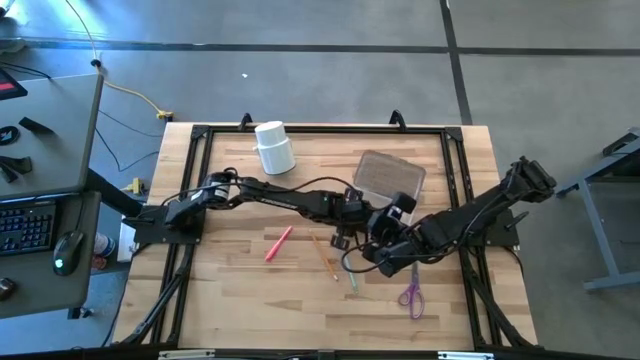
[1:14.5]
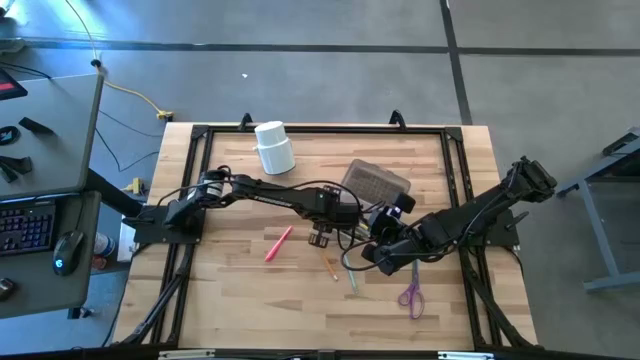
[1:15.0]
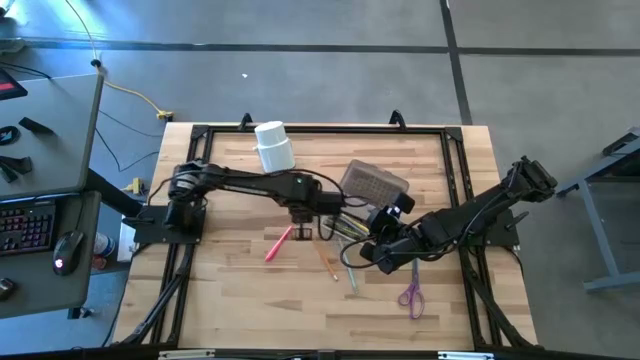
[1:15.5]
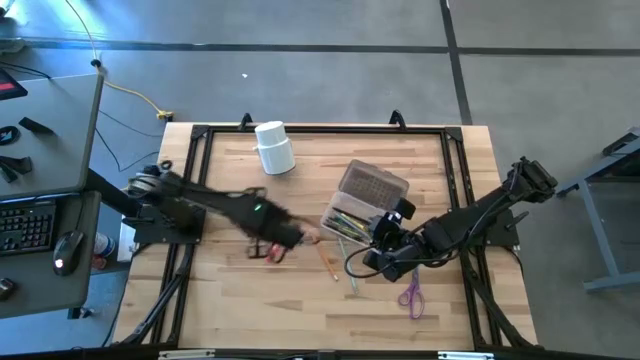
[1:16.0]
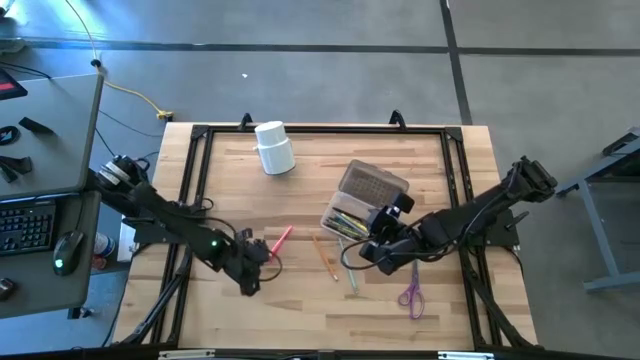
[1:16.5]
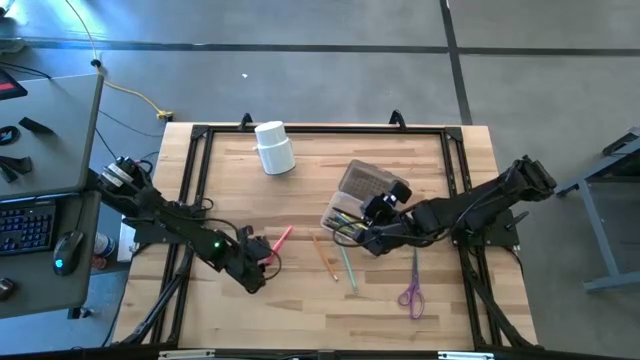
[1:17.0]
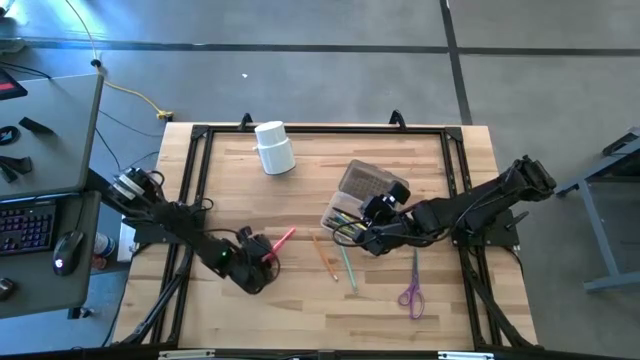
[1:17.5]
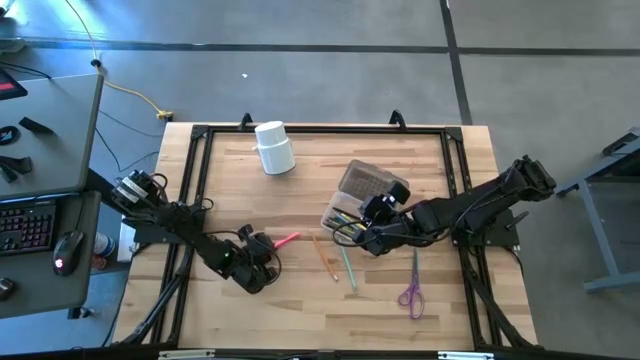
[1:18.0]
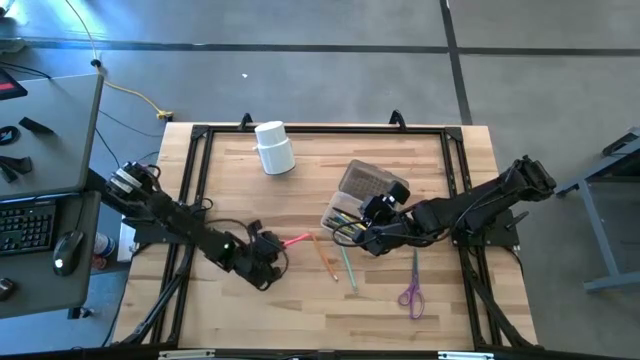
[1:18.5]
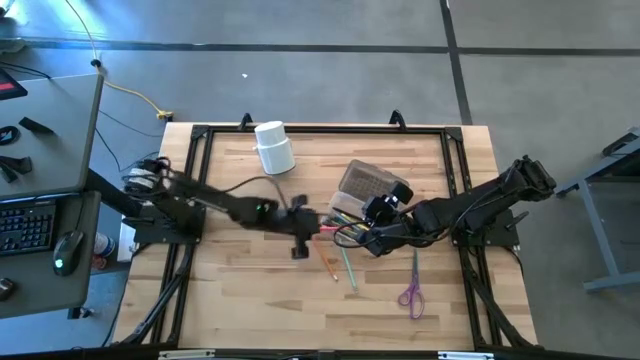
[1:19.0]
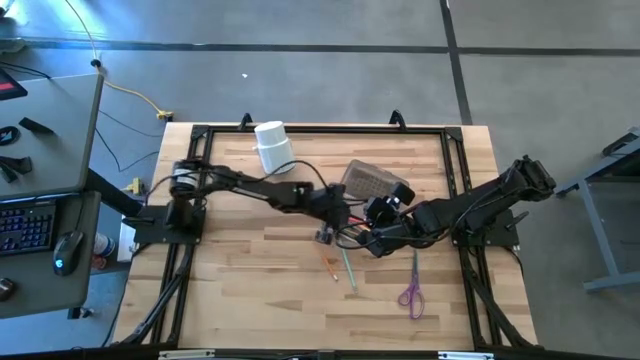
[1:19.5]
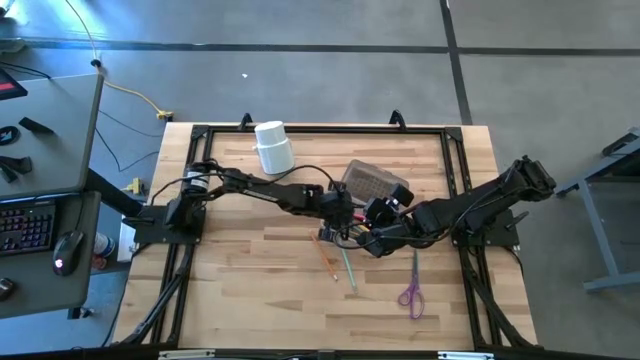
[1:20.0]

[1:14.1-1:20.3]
Task: Pick & place school supplies into a supply box
Put the pink pen into the supply box

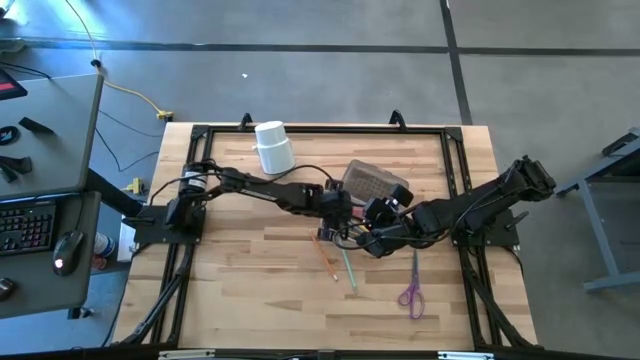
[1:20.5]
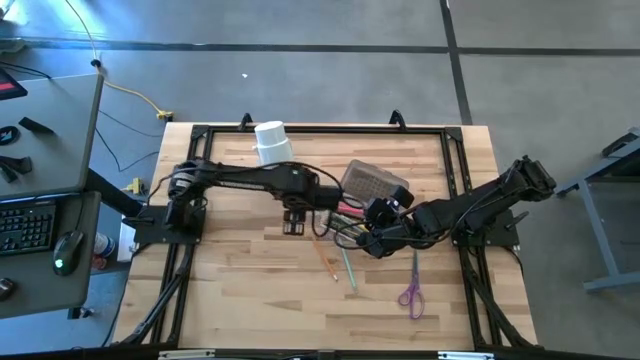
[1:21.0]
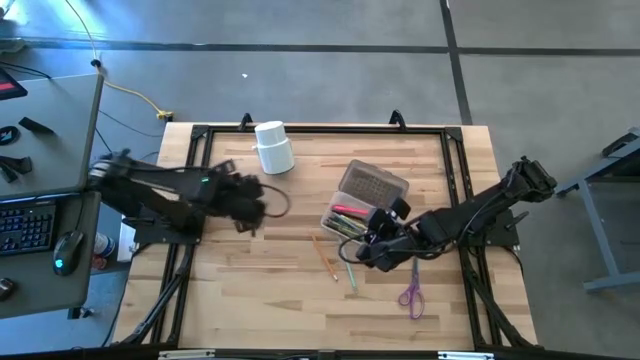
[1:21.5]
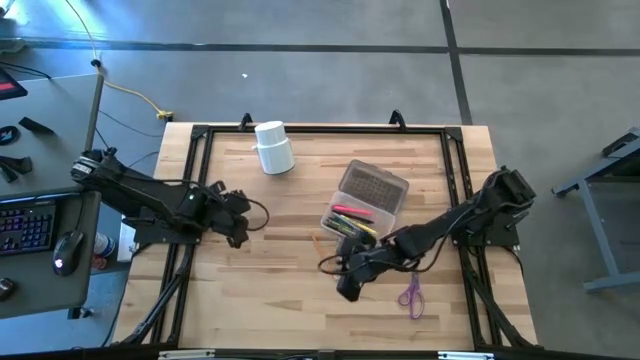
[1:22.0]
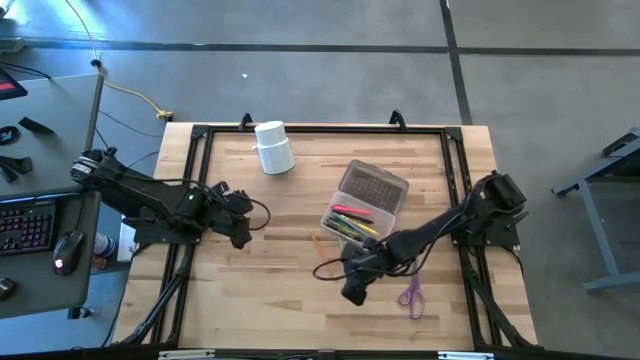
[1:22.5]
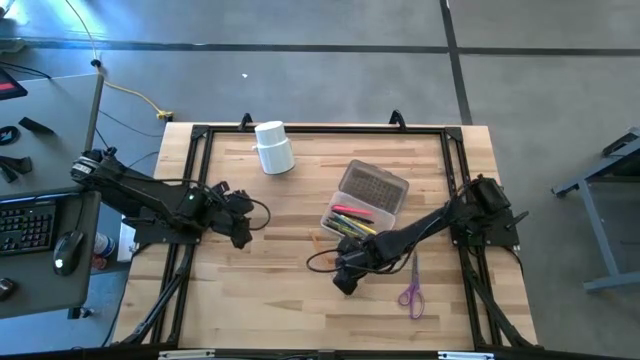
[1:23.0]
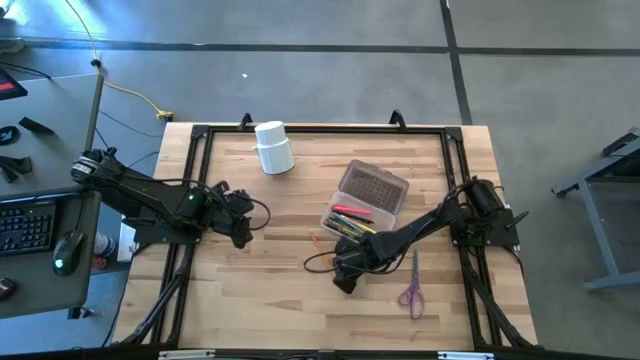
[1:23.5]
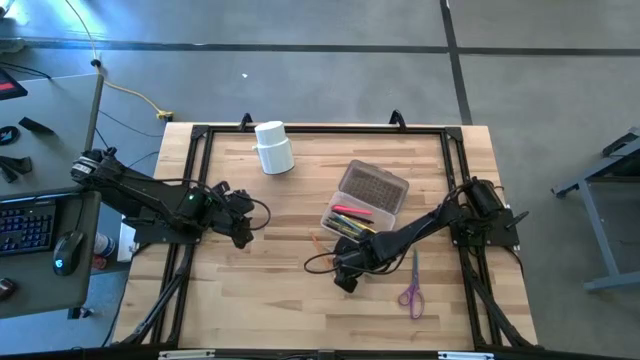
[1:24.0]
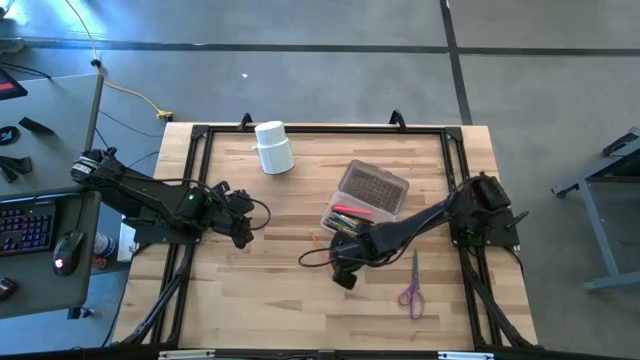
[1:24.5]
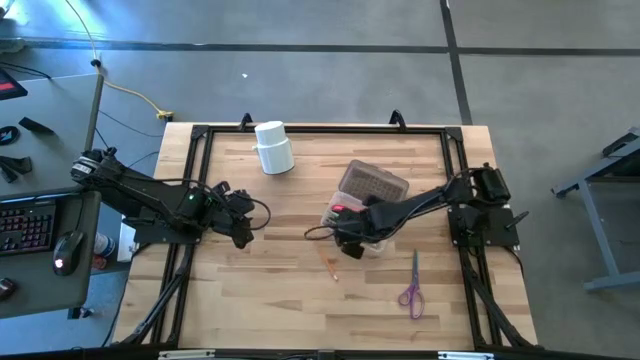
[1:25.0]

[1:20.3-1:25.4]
Put the light blue pencil into the supply box

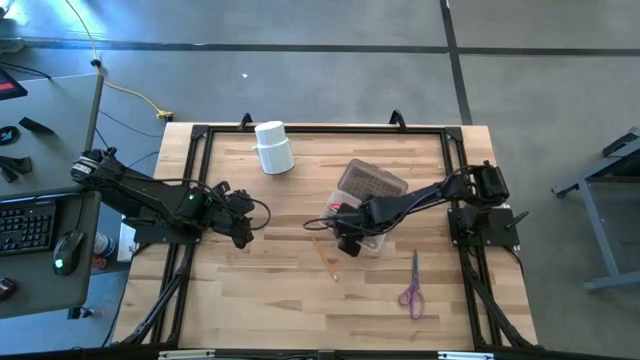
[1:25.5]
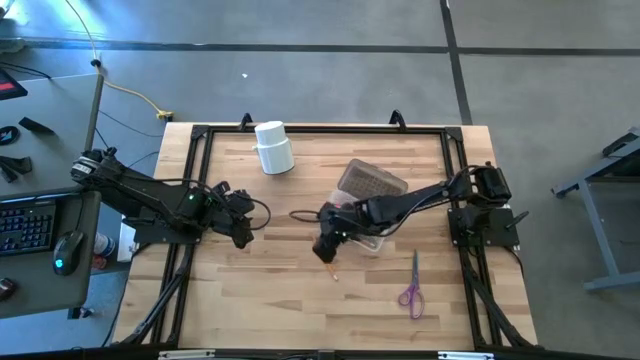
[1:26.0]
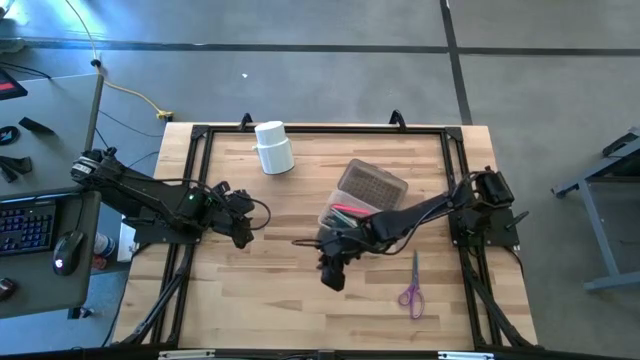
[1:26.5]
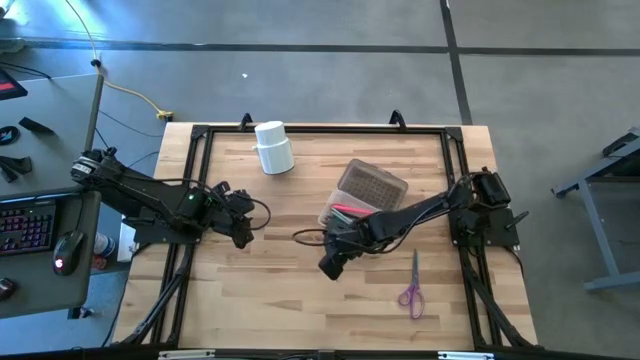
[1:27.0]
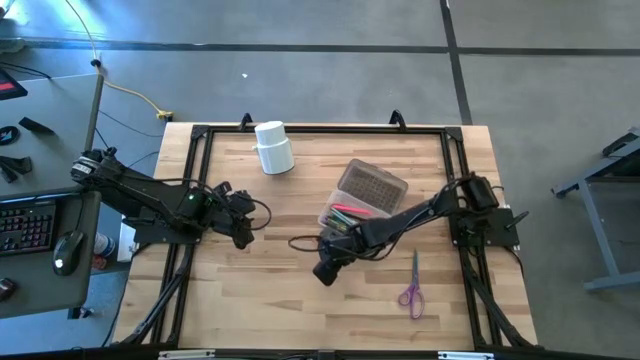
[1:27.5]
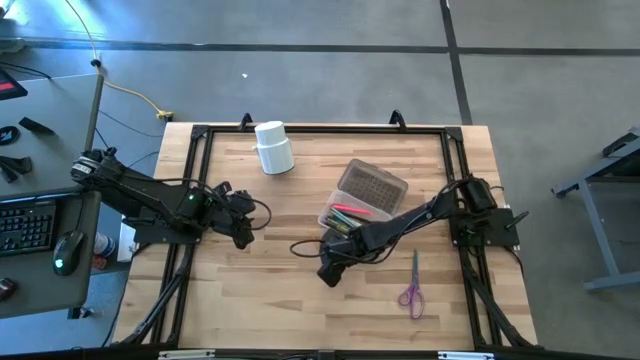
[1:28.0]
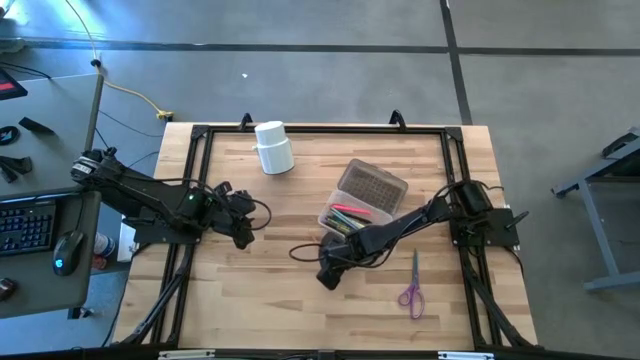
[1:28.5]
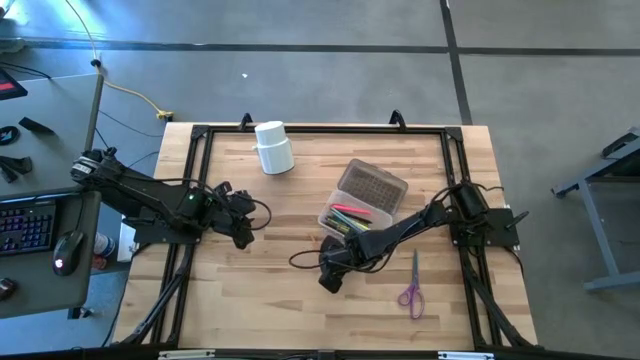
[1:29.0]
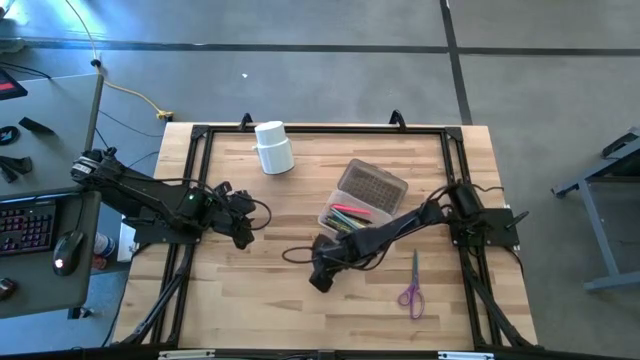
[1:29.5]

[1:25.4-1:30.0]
Put the orange pencil into the supply box

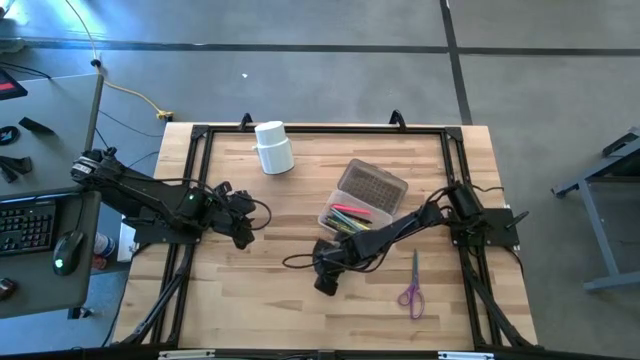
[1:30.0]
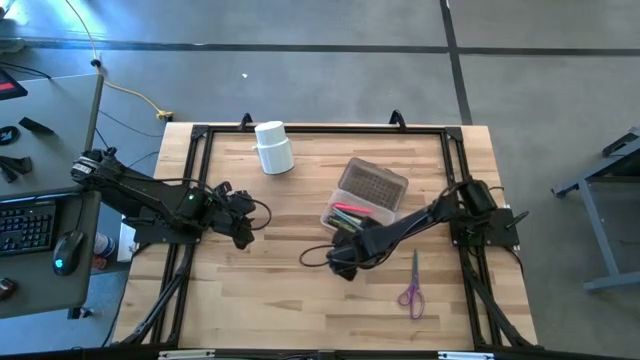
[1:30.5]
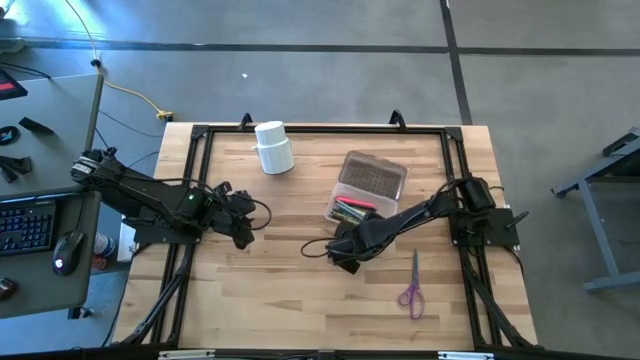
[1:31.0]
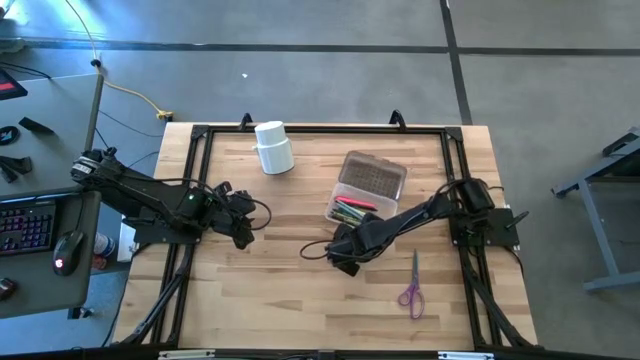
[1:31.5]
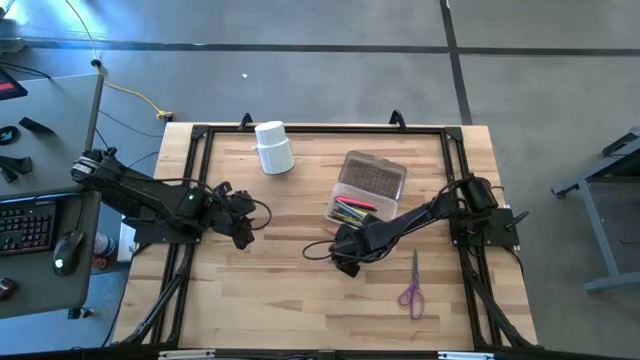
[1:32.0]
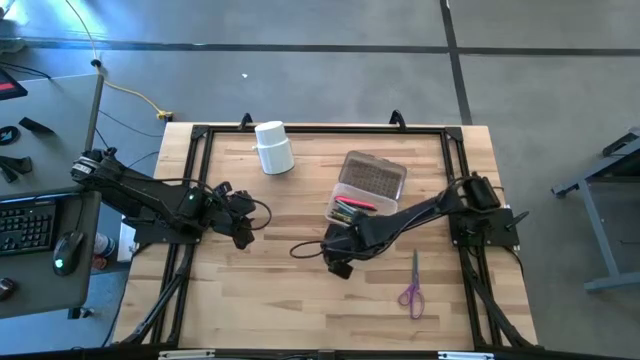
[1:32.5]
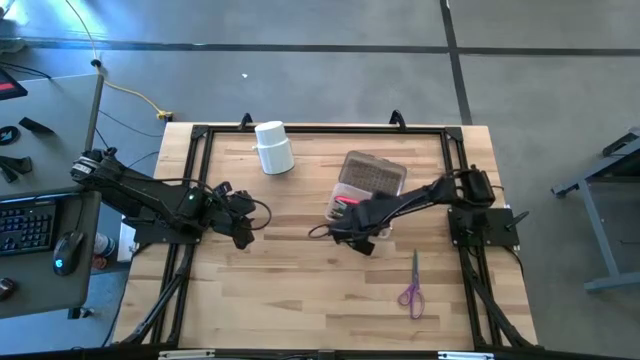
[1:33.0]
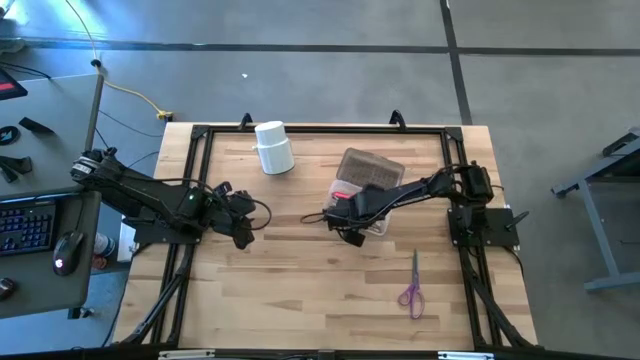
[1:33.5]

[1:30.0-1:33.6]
Put the orange pencil into the supply box

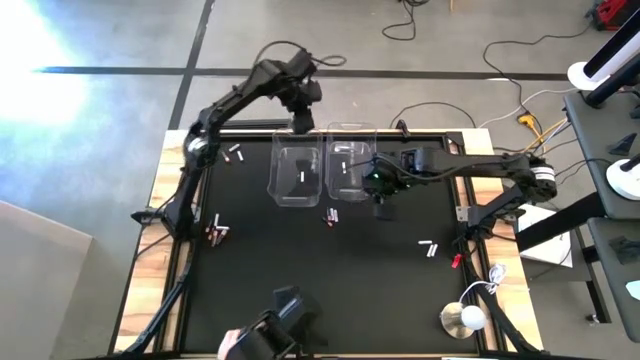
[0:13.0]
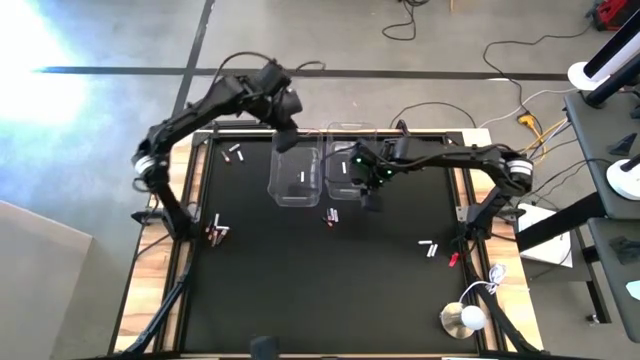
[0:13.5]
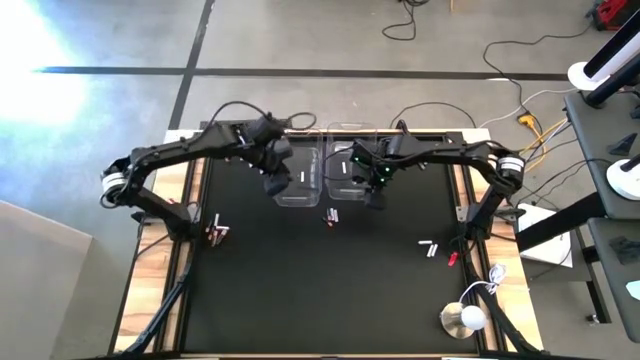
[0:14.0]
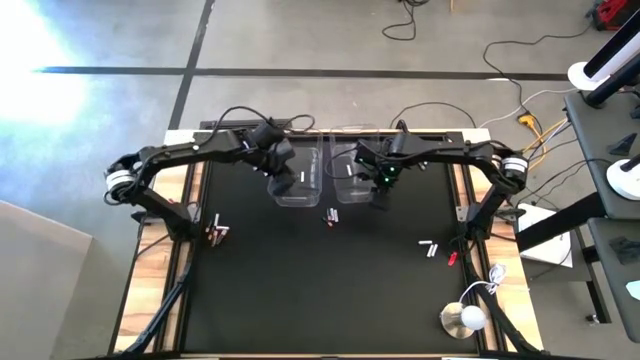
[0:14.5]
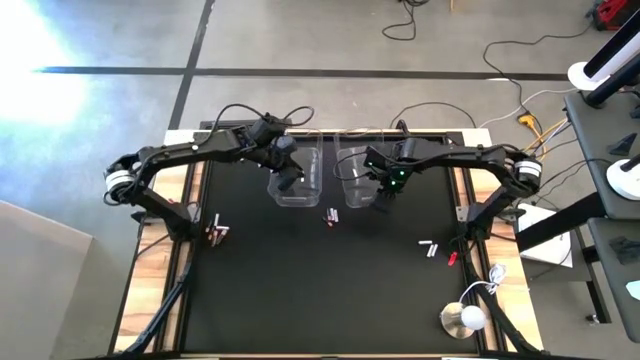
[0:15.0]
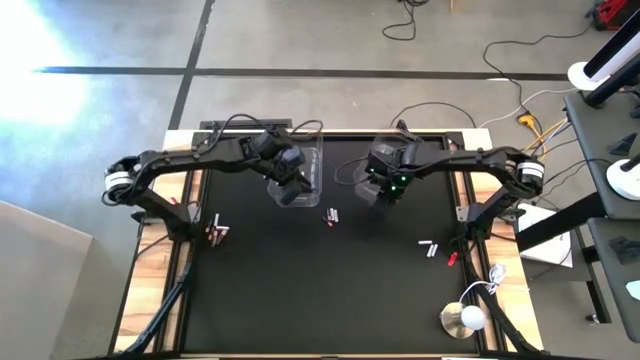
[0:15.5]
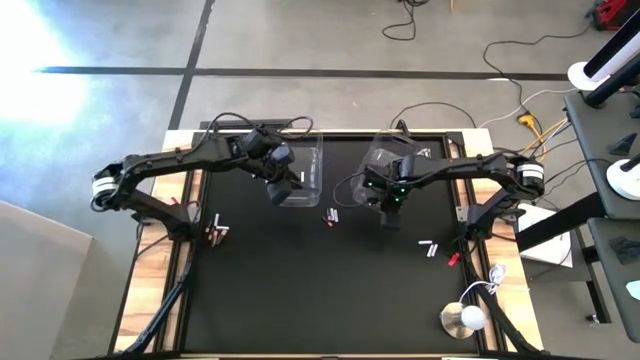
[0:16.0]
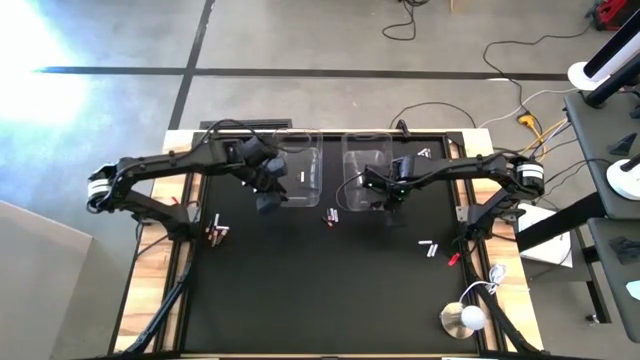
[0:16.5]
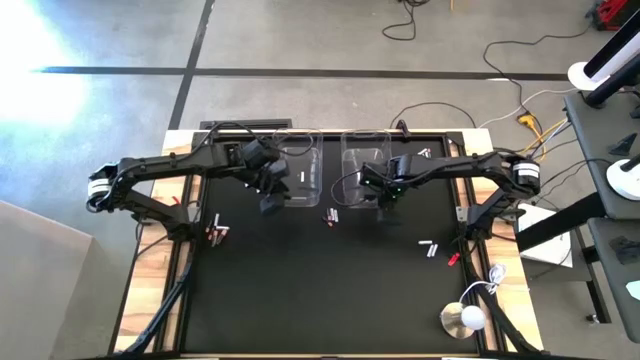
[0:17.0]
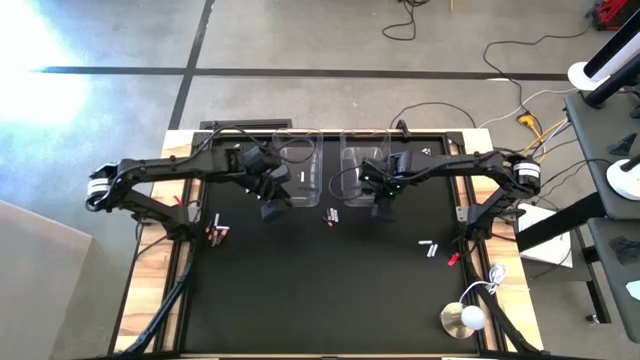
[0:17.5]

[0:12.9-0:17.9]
Task: Sort batteries
Adjust the right transparent bin
